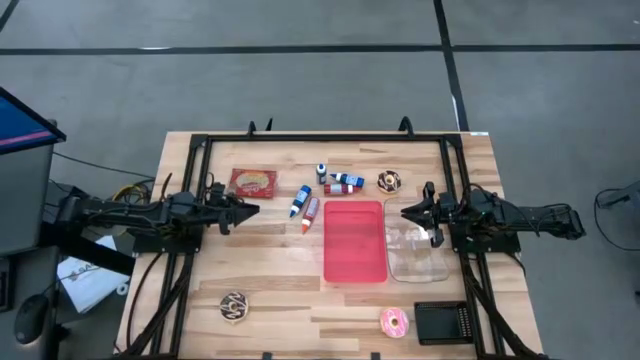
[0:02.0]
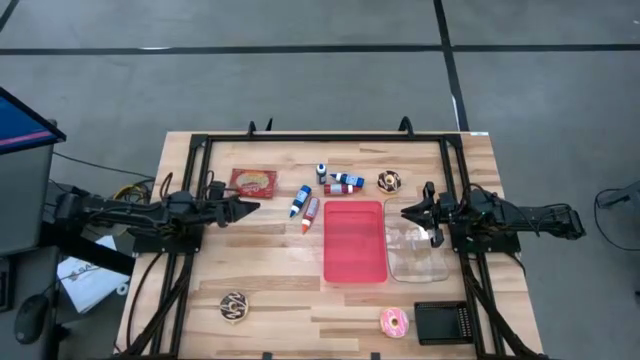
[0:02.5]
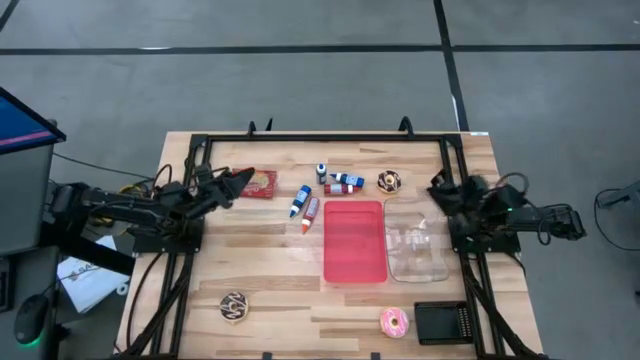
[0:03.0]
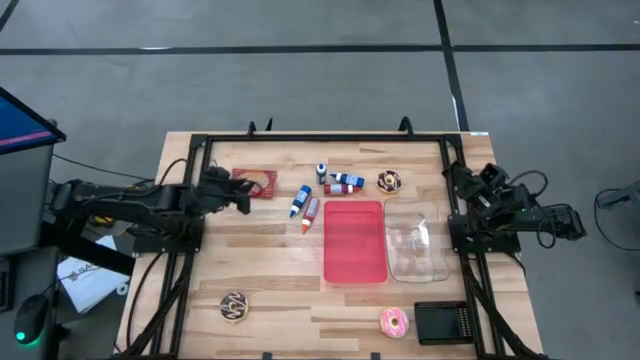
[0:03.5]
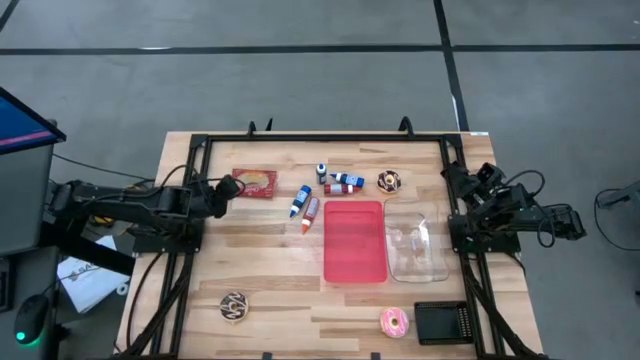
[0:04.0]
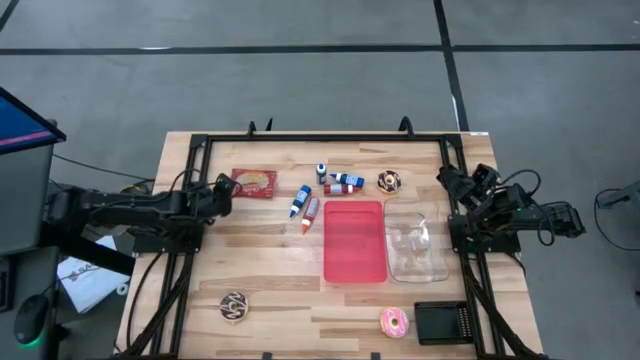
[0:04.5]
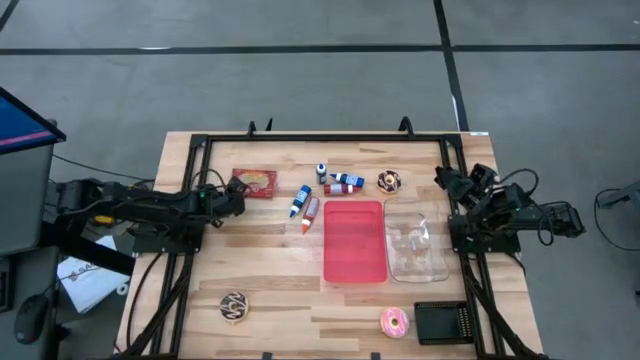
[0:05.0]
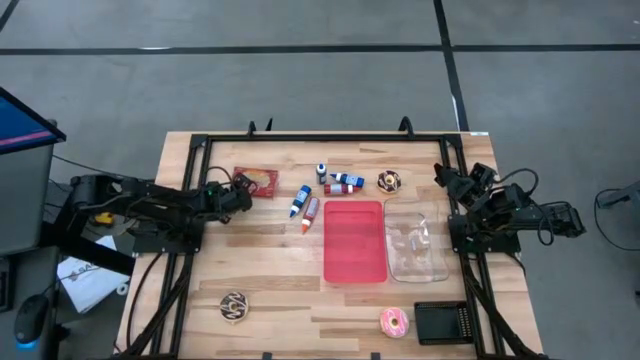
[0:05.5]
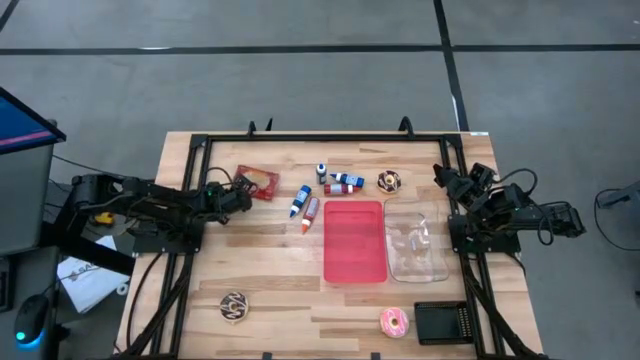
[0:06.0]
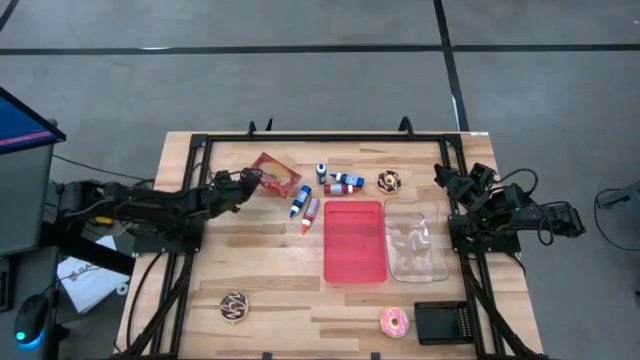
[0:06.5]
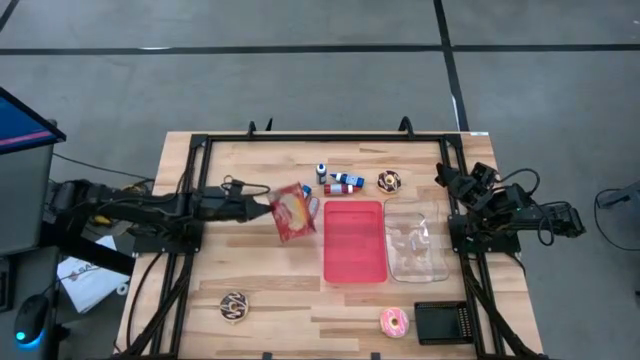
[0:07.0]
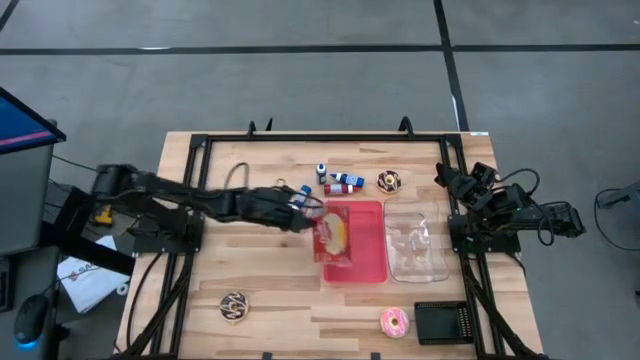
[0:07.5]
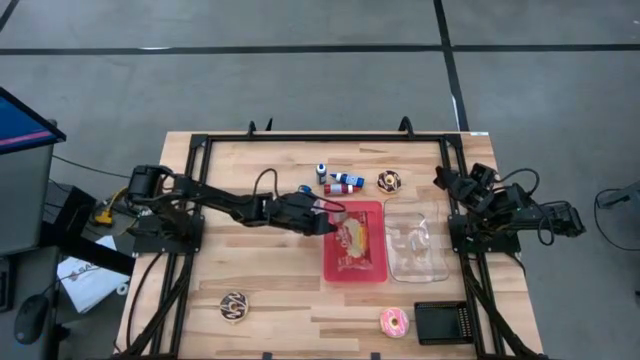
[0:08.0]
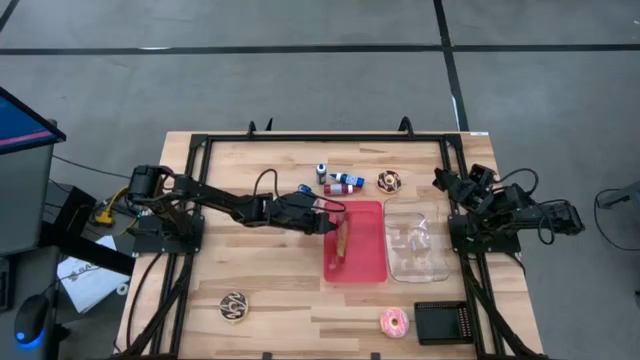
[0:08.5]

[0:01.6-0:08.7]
Put the popcorn bag into the red bin
